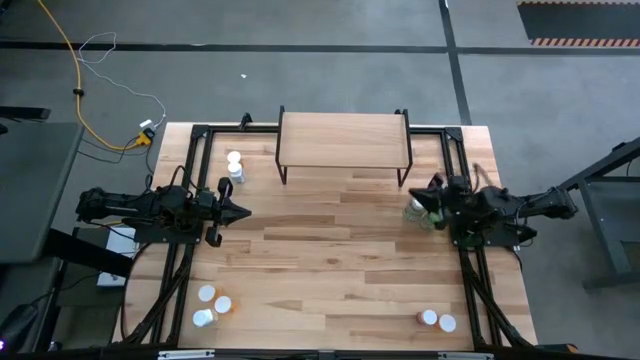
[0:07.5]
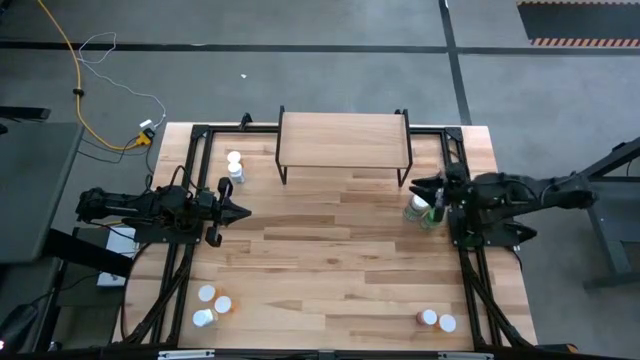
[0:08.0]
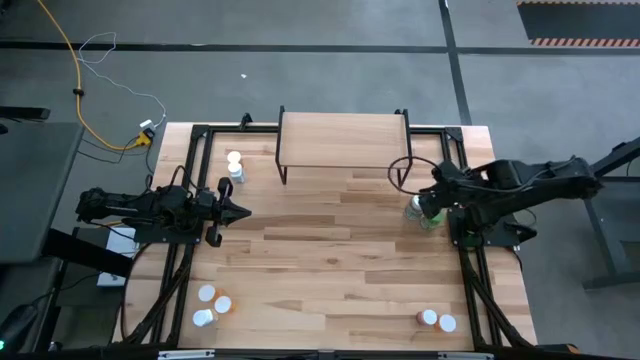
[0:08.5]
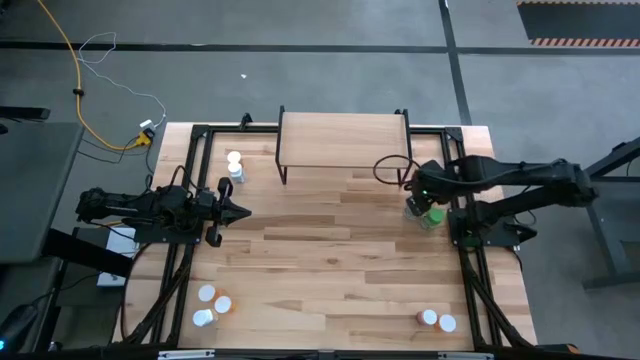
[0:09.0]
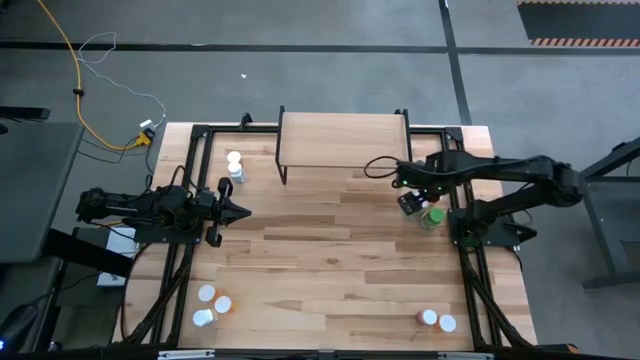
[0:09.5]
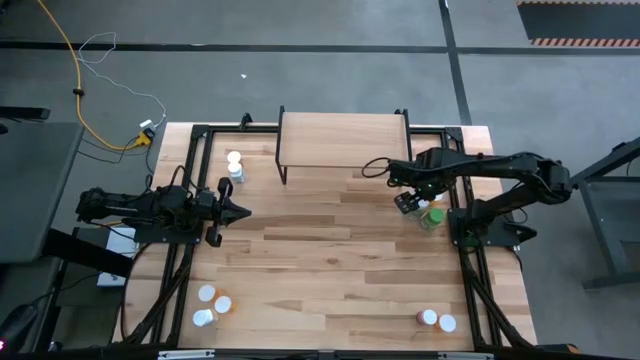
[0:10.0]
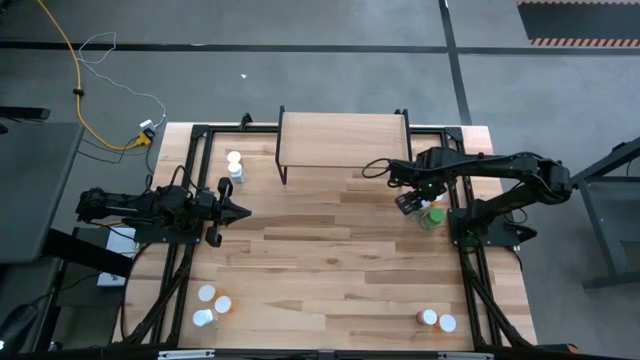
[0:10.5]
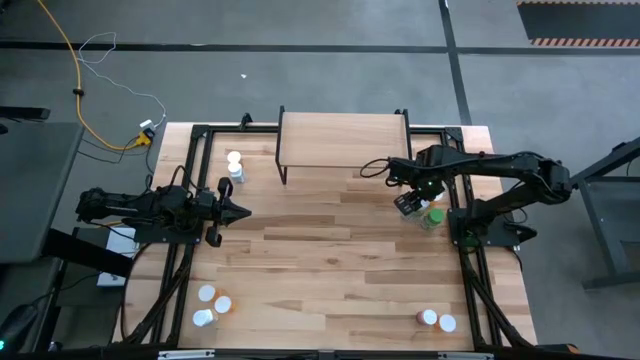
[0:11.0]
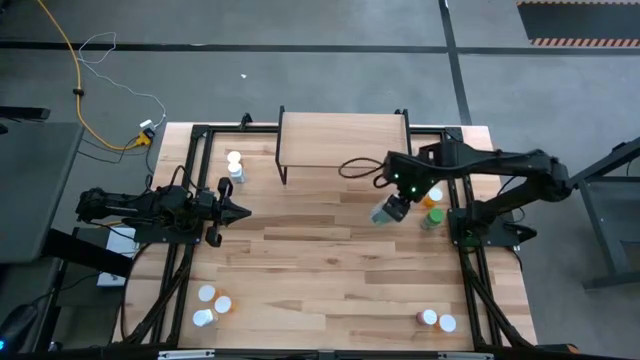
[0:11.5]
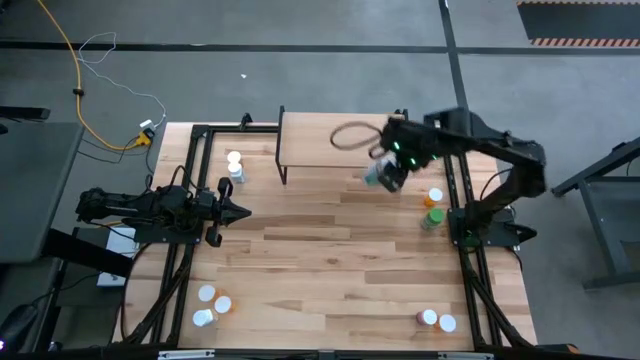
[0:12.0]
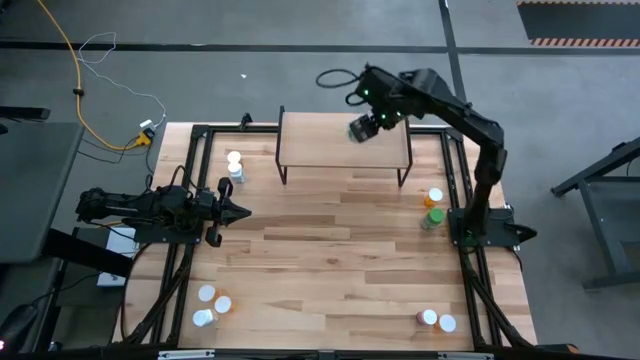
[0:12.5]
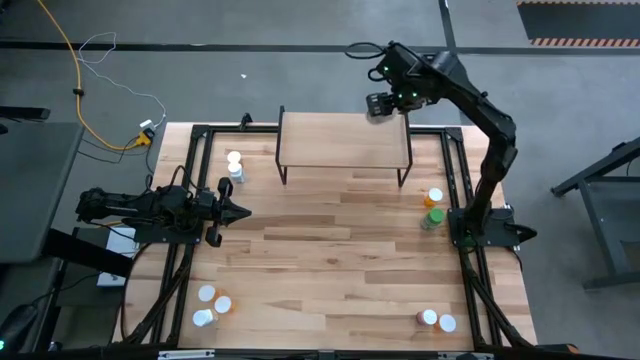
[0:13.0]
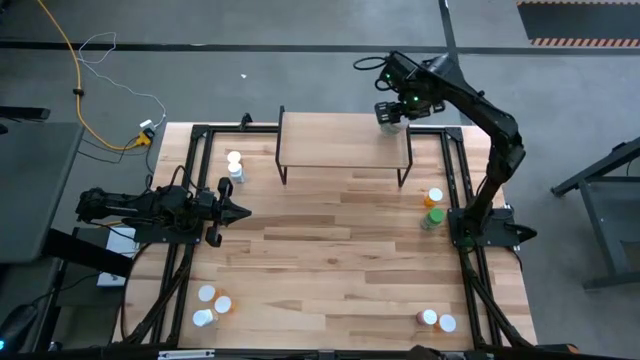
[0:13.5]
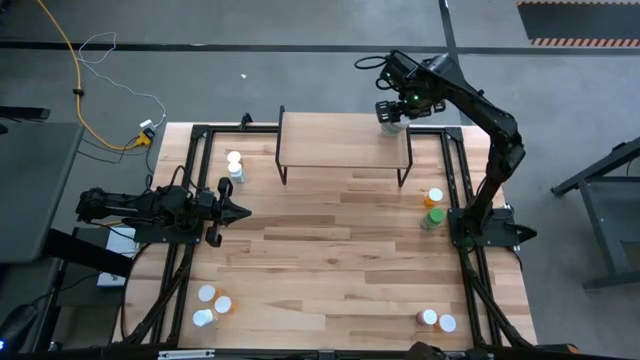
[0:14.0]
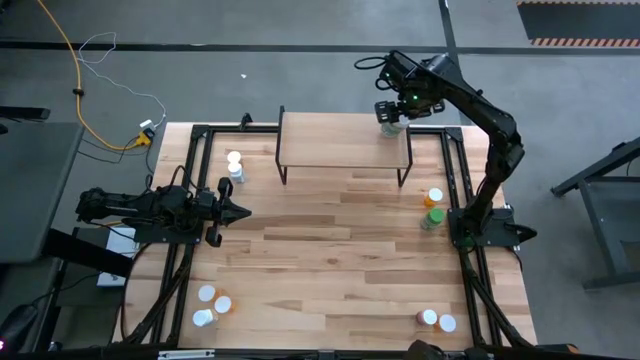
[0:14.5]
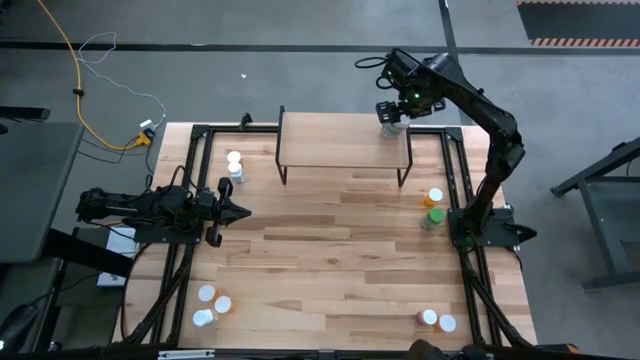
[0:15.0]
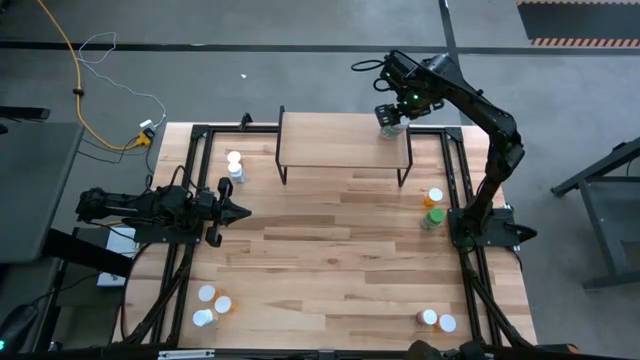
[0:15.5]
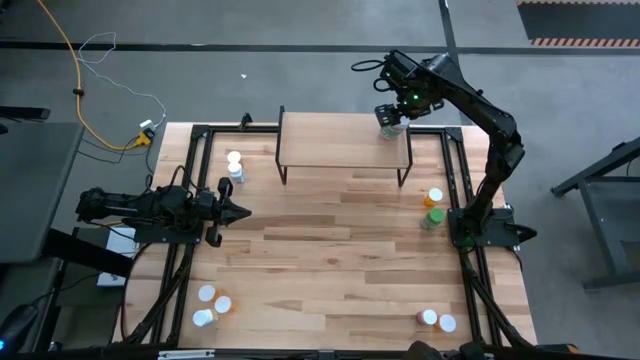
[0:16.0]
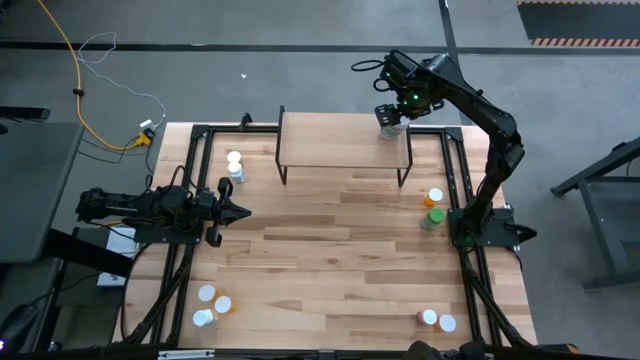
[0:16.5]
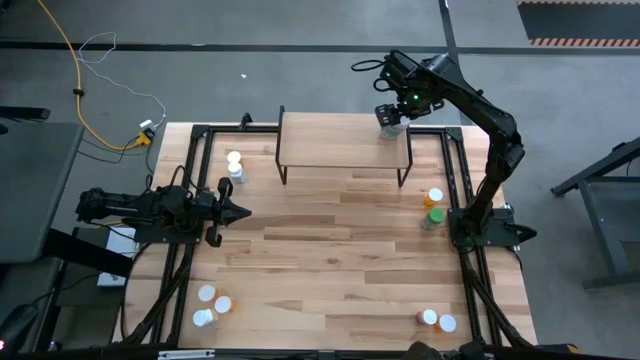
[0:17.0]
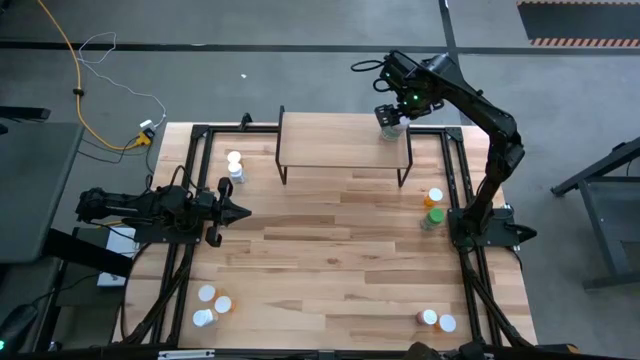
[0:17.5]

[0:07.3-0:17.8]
Task: Pick and place medicine bottles onto shelf by color
Put the green pill bottle on the shelf

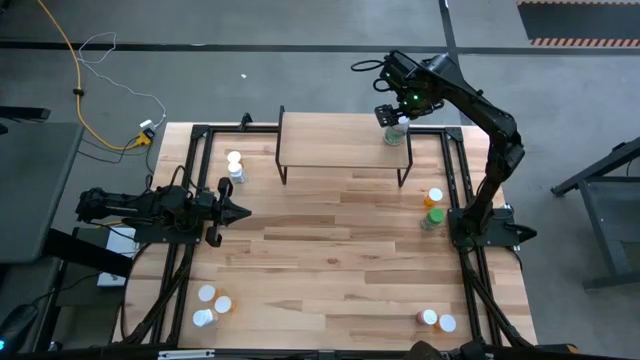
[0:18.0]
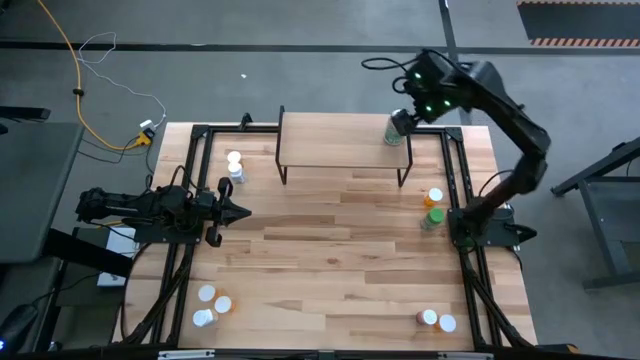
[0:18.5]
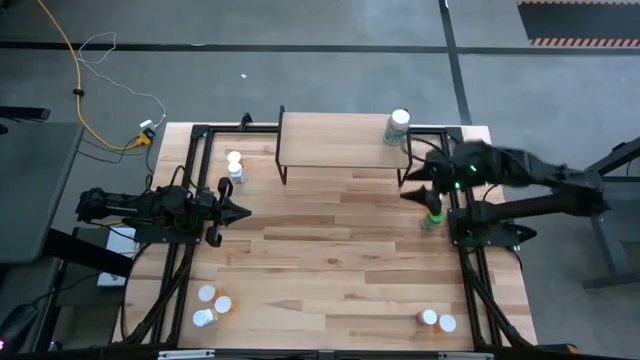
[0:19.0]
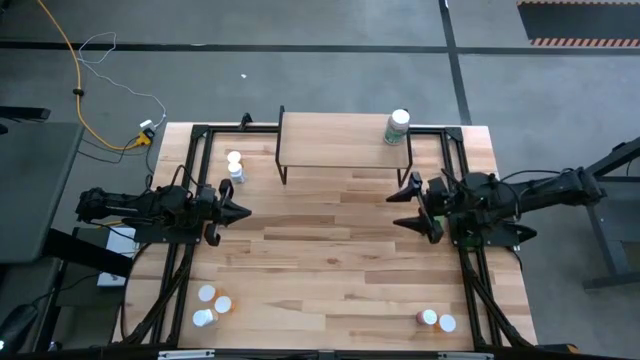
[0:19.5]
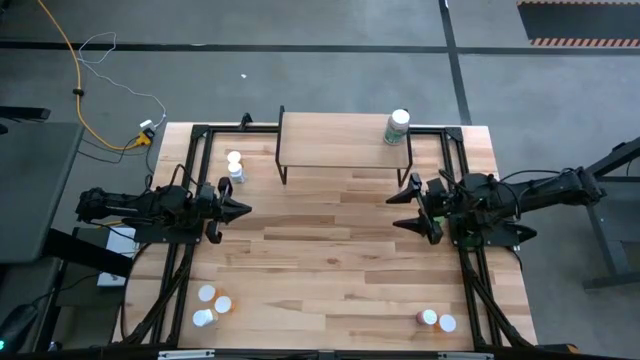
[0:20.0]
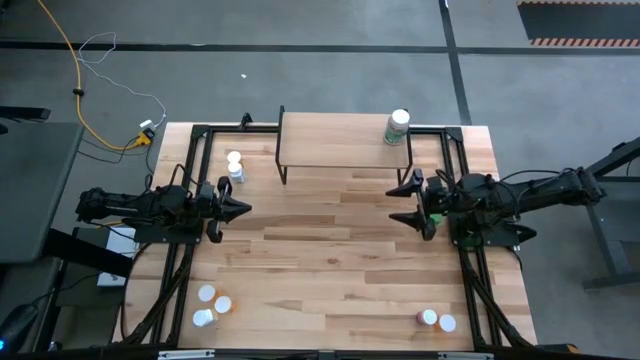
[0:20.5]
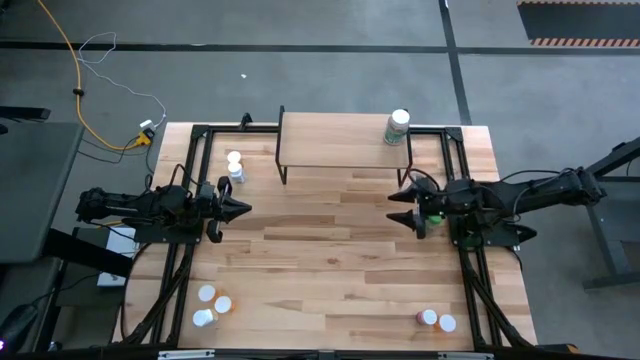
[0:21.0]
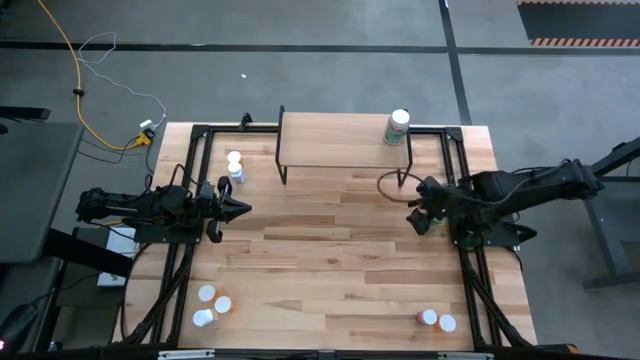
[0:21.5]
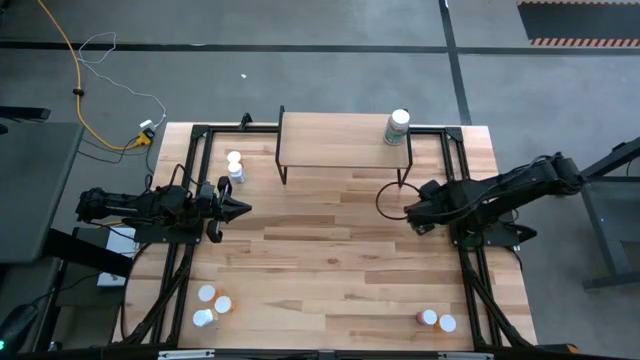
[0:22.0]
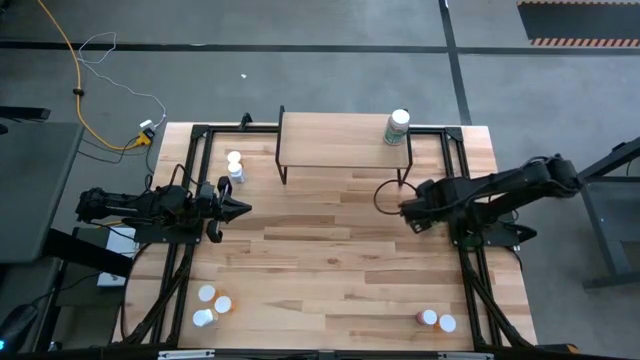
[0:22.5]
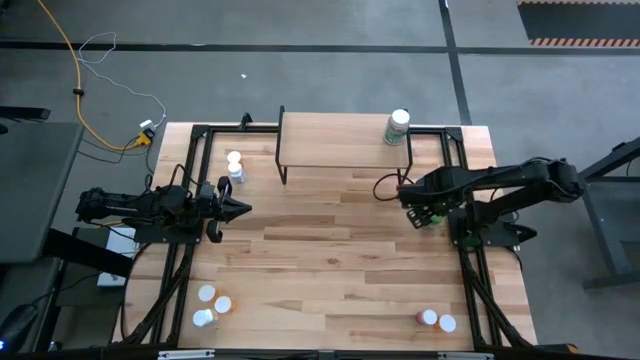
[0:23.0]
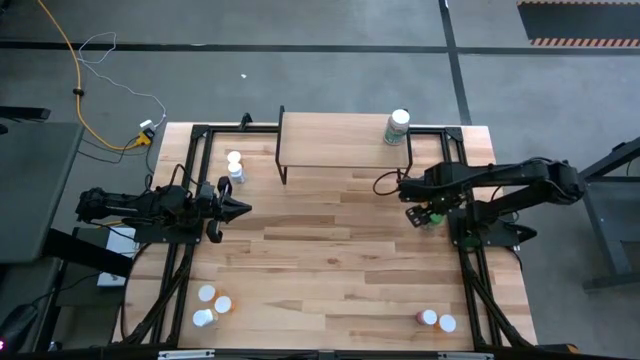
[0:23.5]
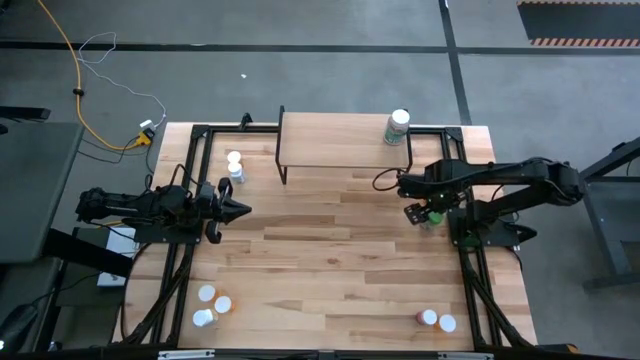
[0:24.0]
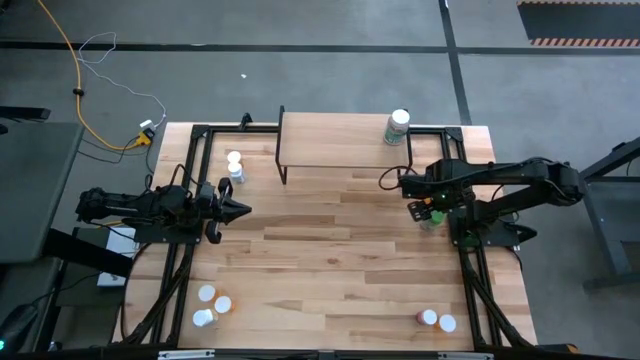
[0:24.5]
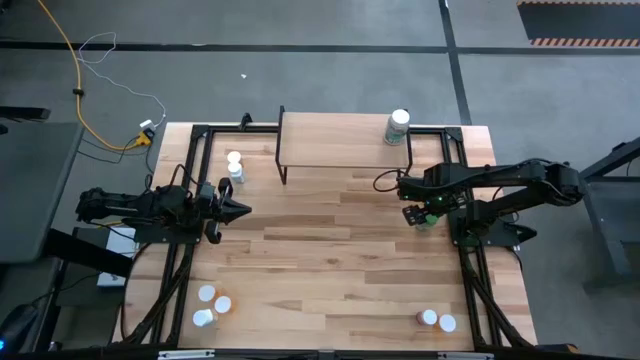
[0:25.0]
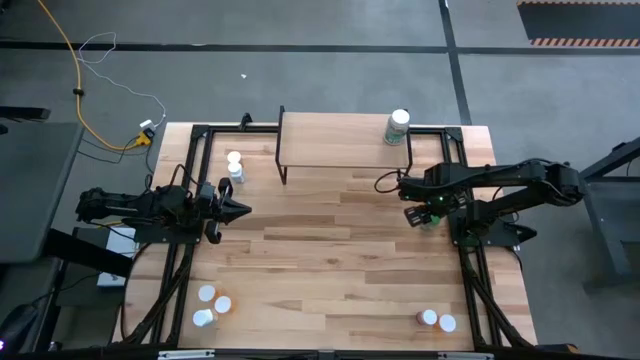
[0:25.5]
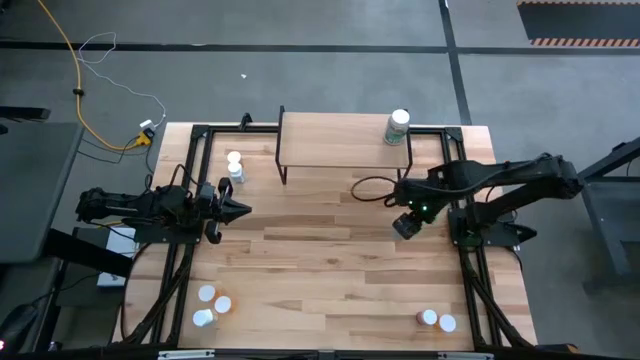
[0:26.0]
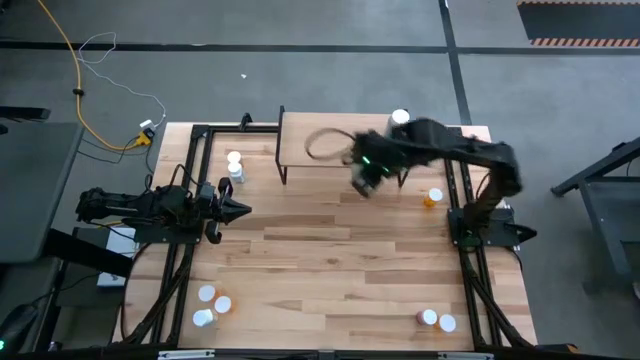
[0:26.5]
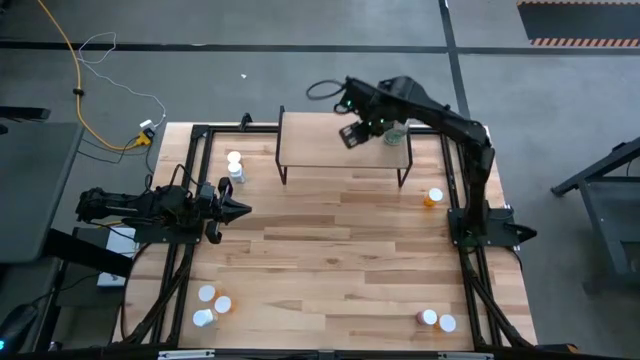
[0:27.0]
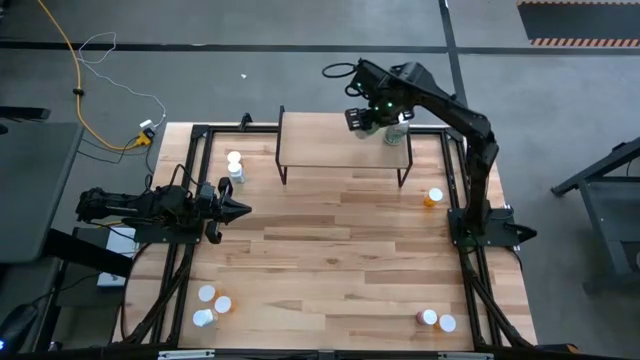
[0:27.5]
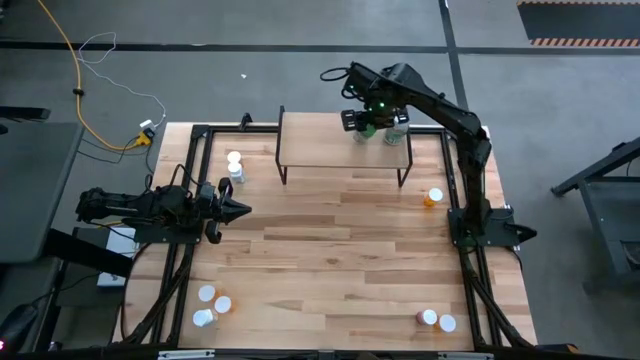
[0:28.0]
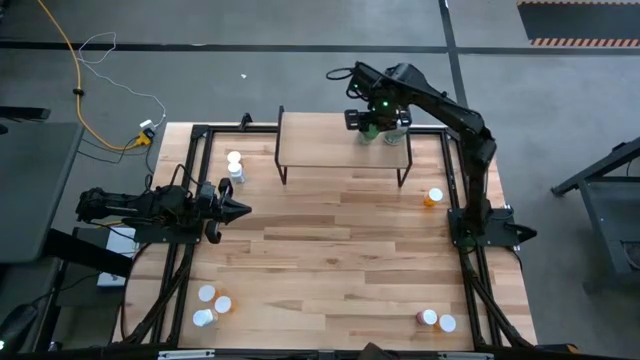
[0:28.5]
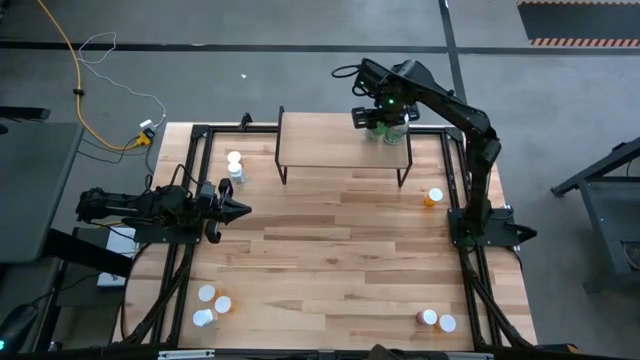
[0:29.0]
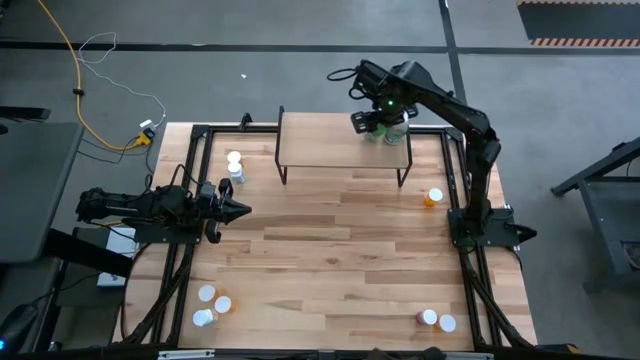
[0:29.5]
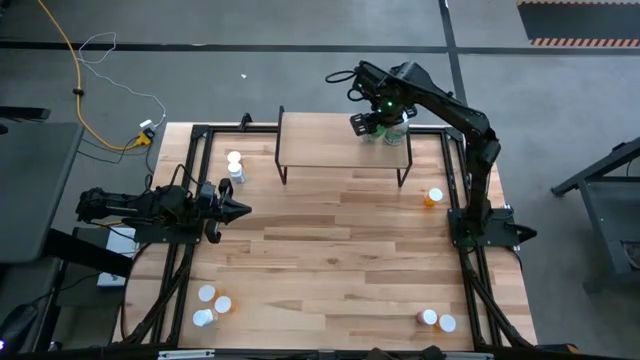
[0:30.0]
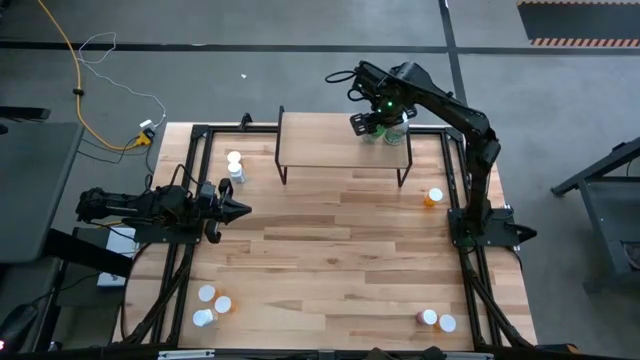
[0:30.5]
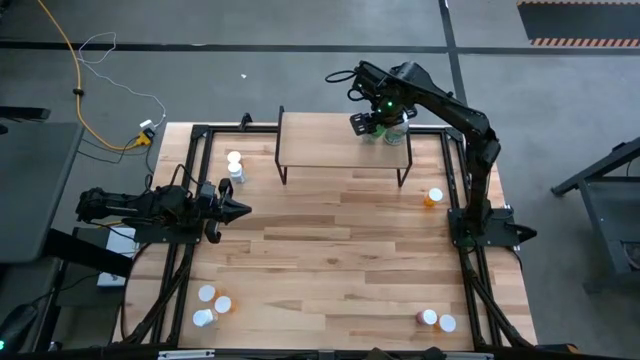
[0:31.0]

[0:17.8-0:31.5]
Put the light green pill bottle on the shelf
